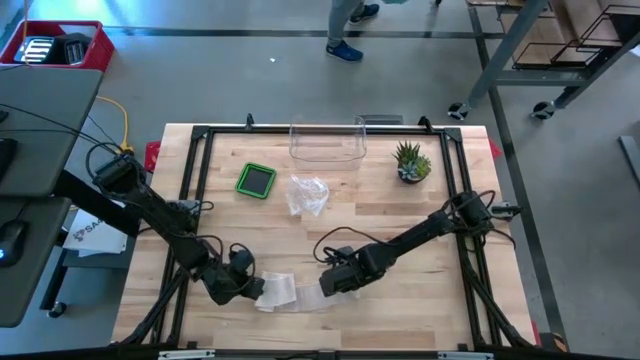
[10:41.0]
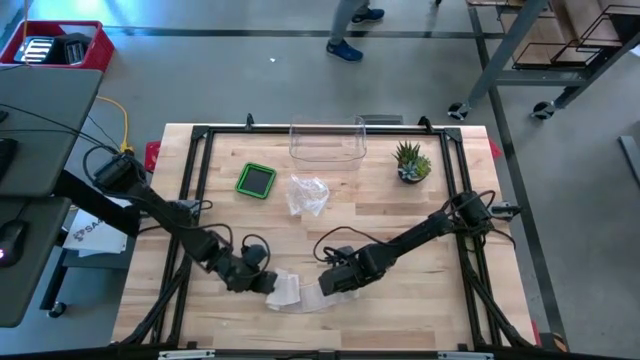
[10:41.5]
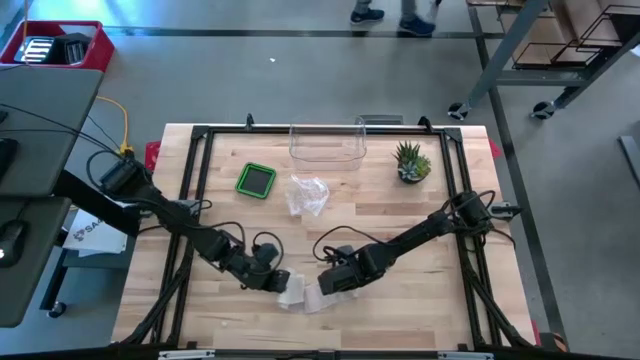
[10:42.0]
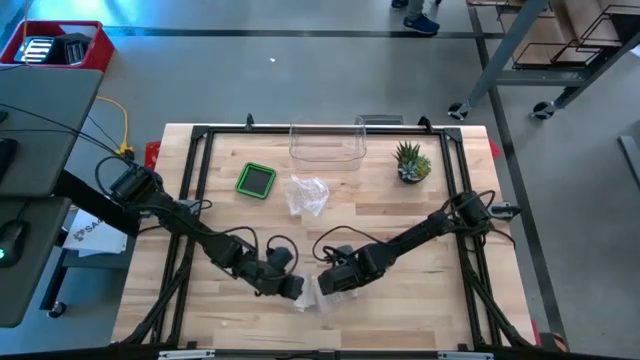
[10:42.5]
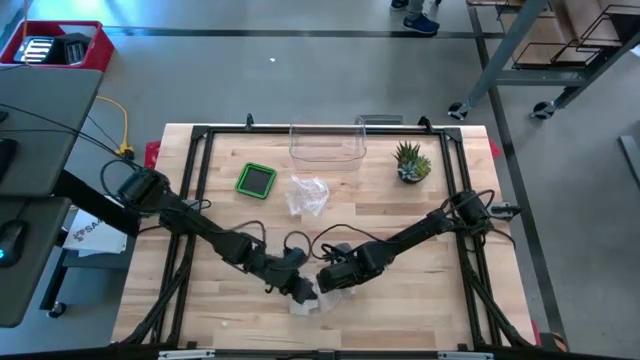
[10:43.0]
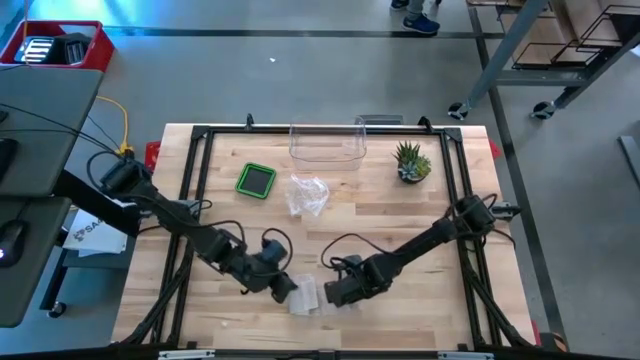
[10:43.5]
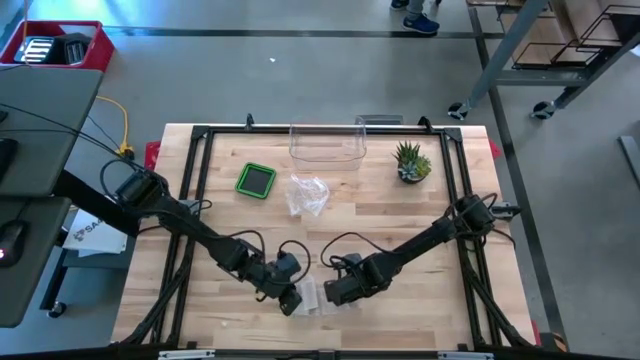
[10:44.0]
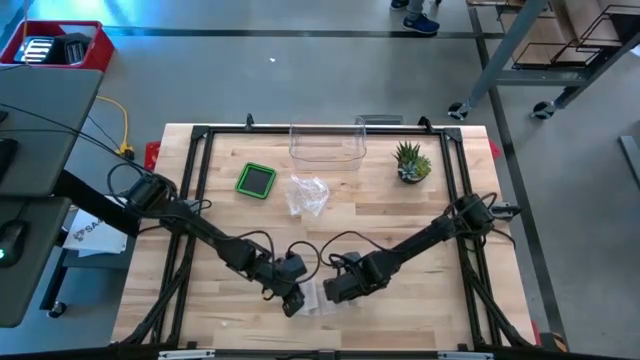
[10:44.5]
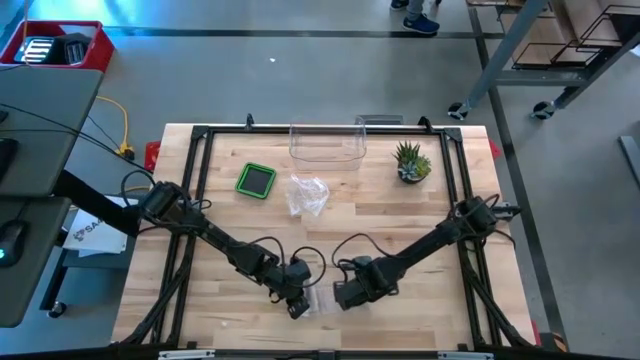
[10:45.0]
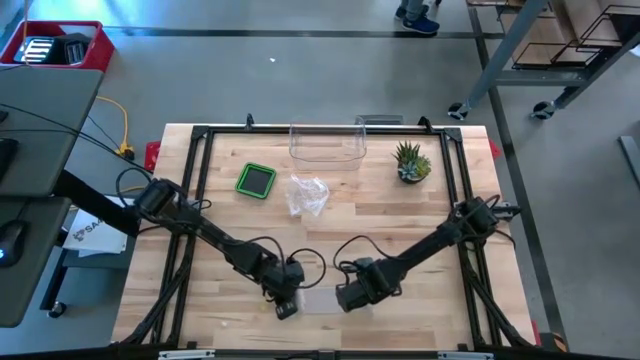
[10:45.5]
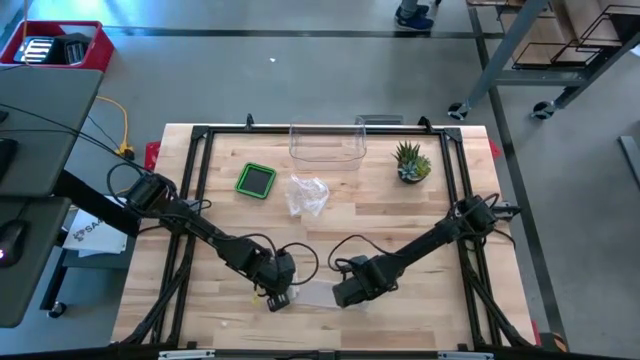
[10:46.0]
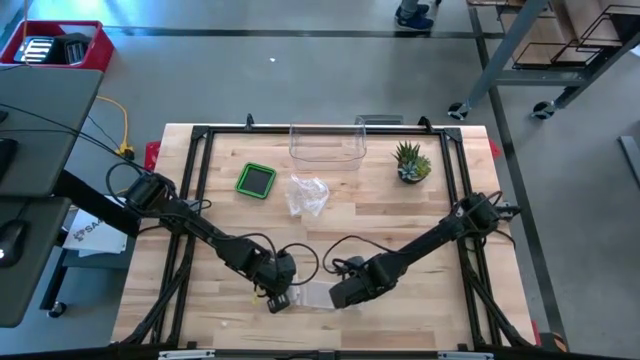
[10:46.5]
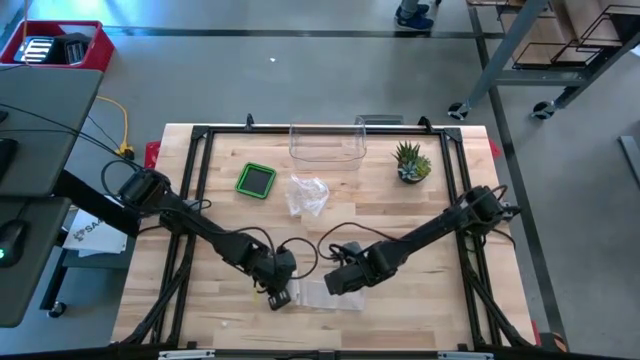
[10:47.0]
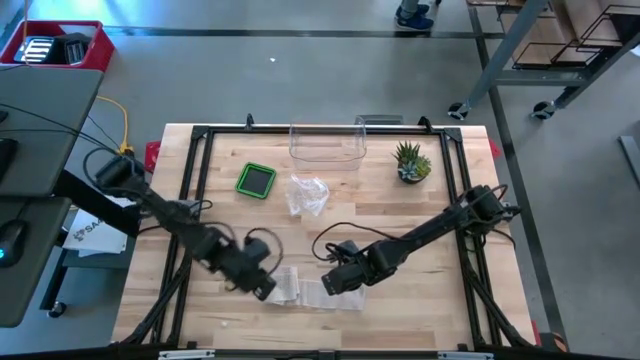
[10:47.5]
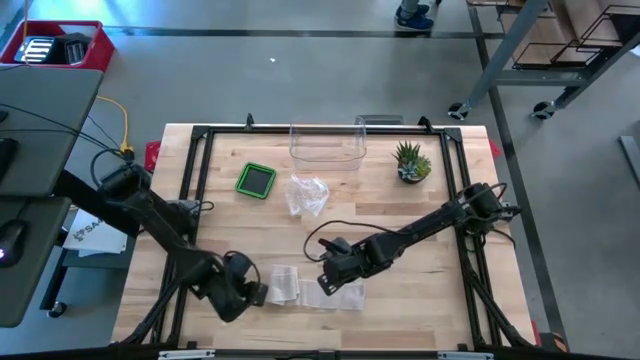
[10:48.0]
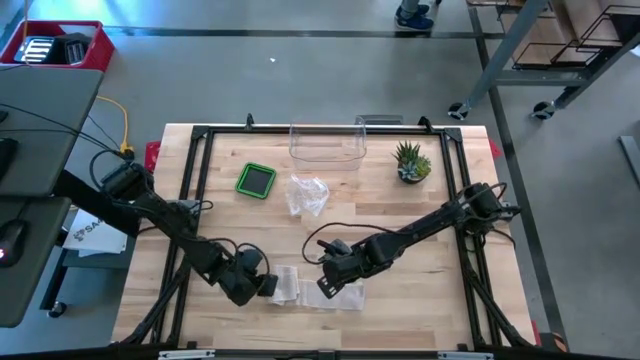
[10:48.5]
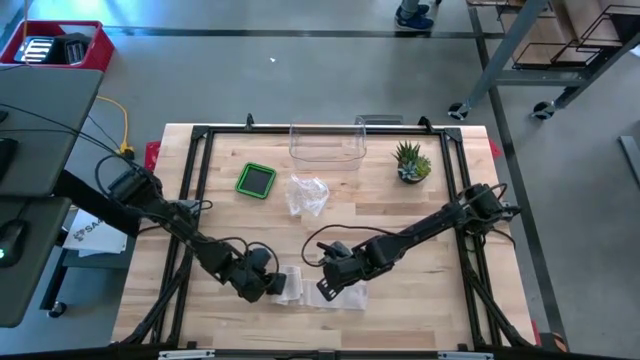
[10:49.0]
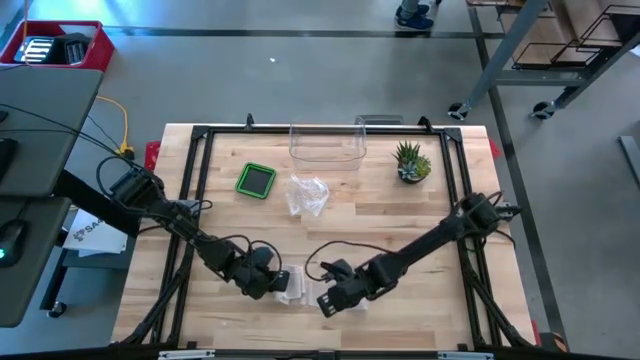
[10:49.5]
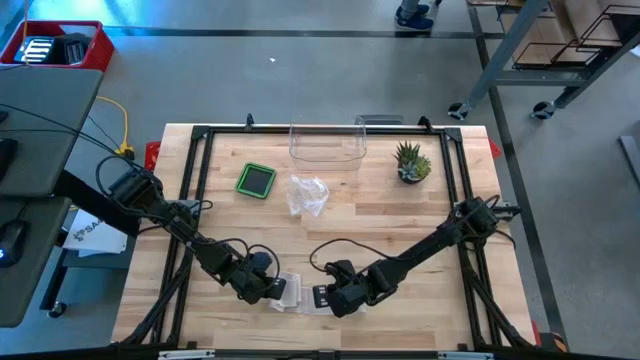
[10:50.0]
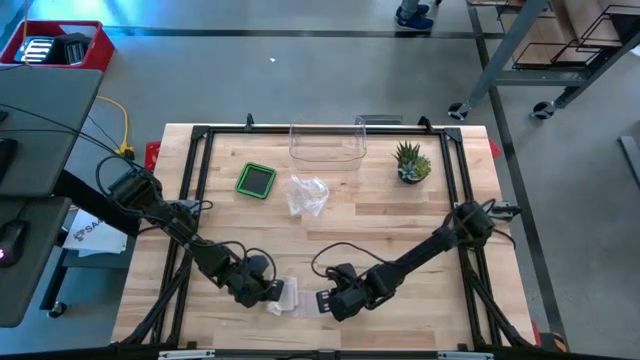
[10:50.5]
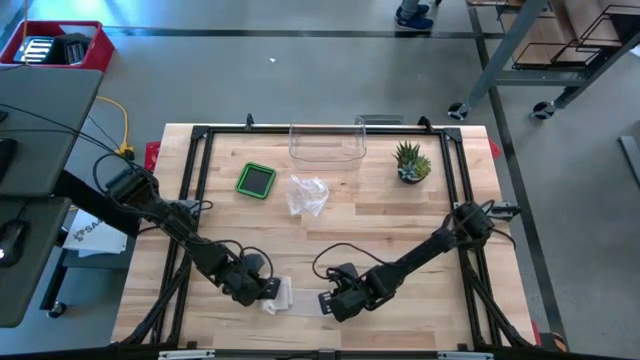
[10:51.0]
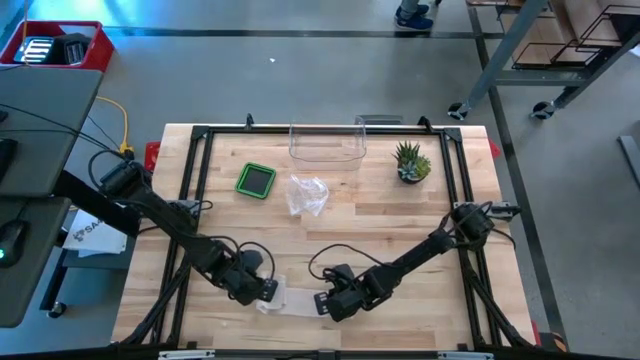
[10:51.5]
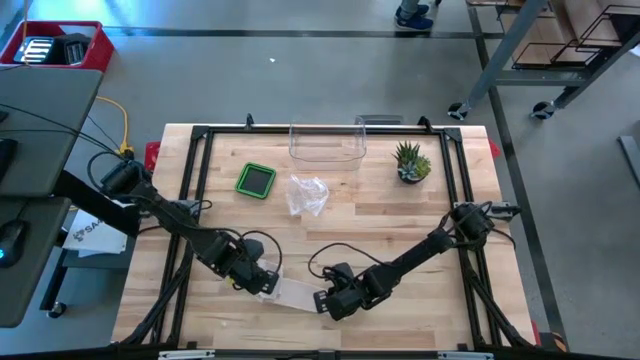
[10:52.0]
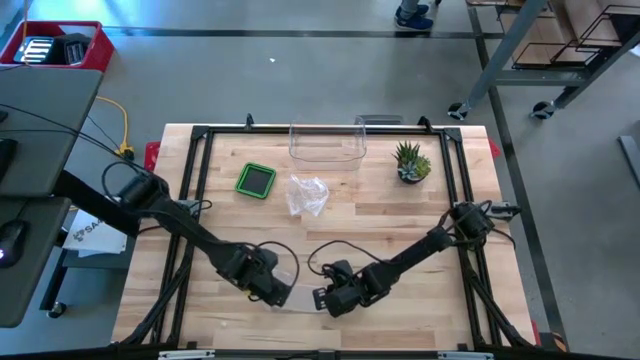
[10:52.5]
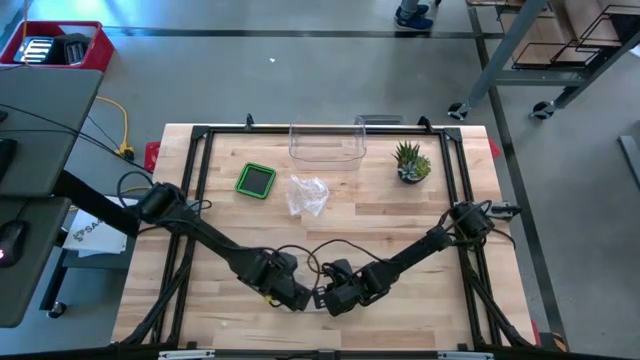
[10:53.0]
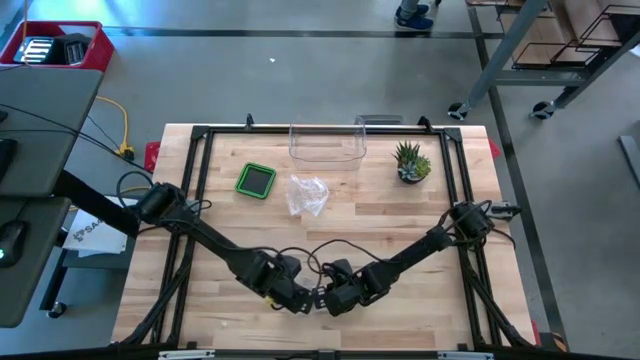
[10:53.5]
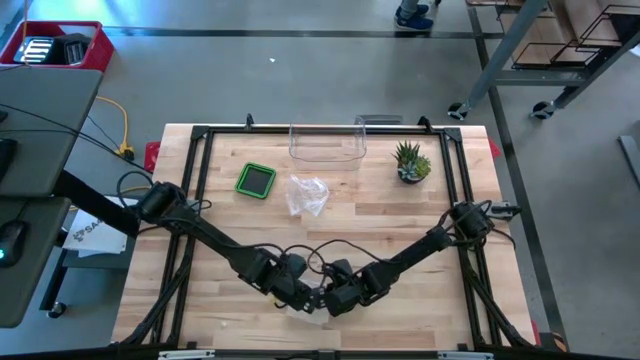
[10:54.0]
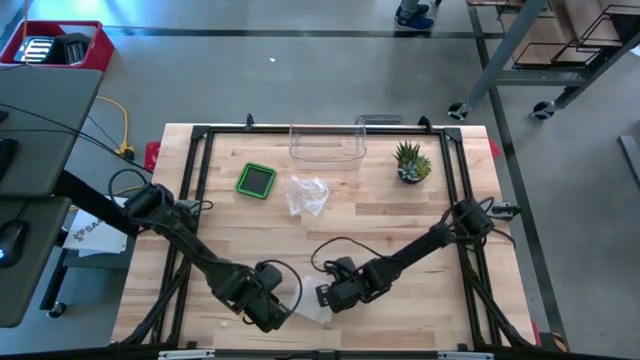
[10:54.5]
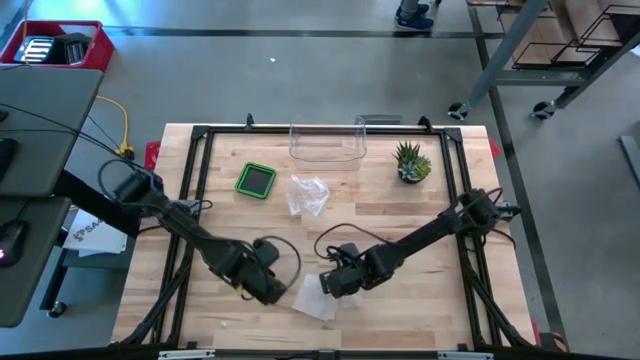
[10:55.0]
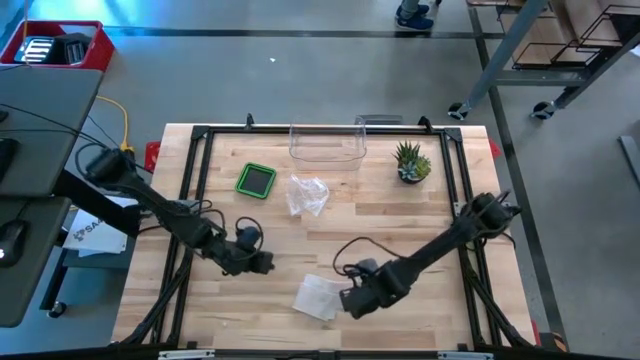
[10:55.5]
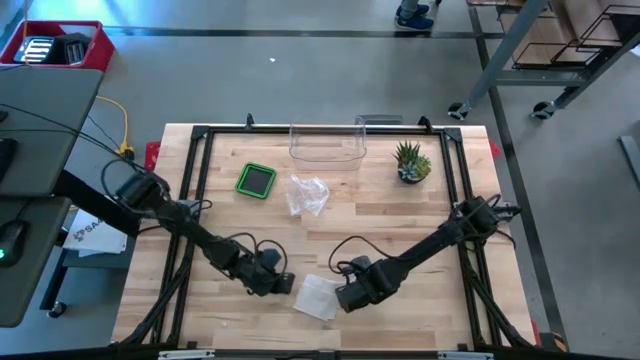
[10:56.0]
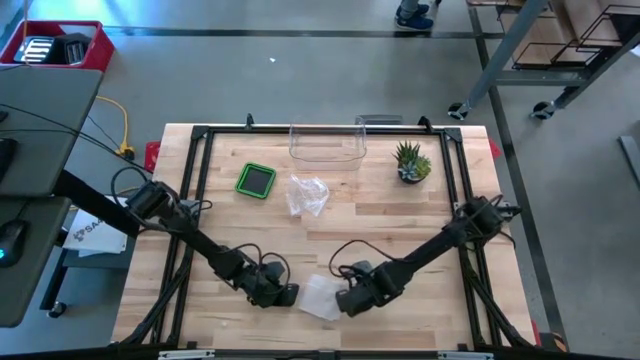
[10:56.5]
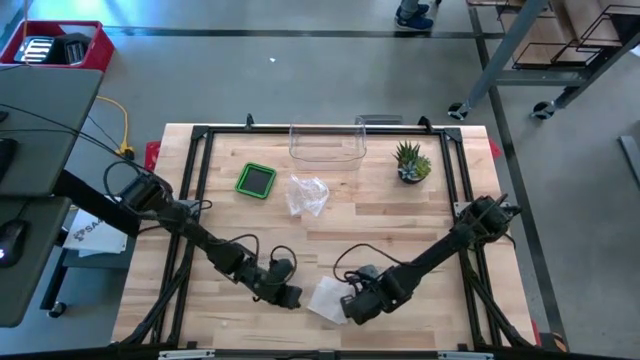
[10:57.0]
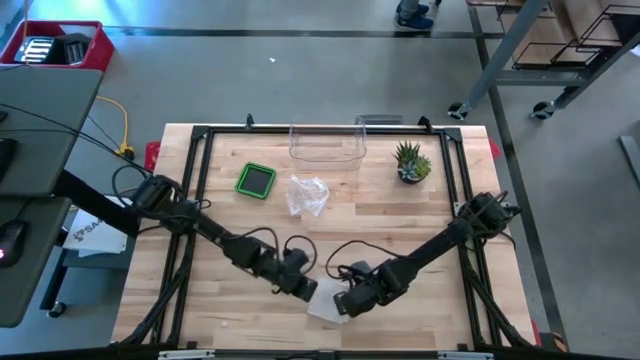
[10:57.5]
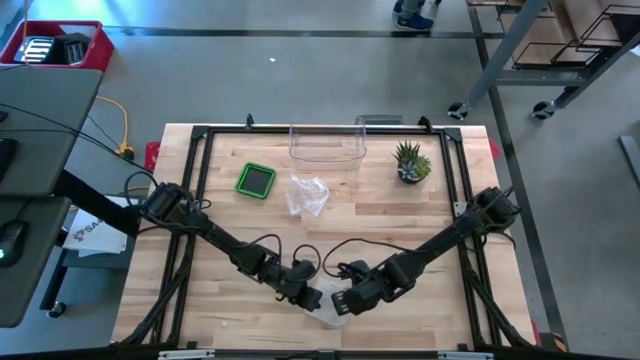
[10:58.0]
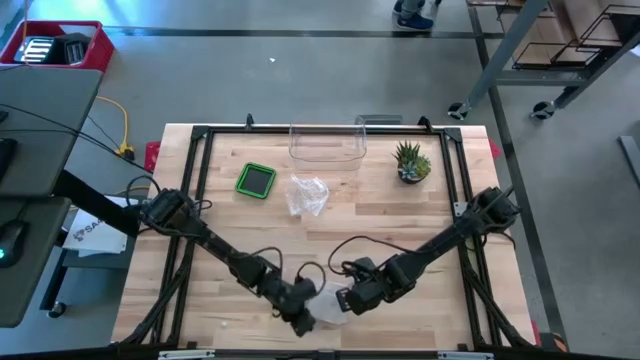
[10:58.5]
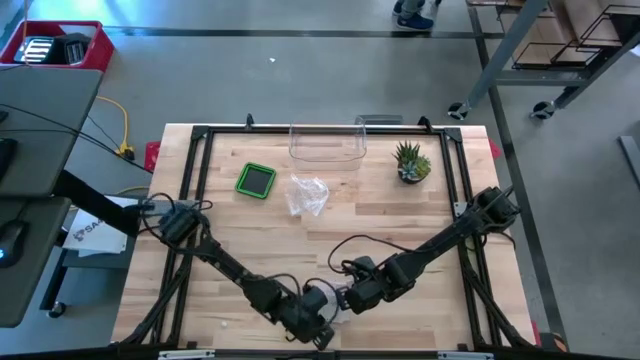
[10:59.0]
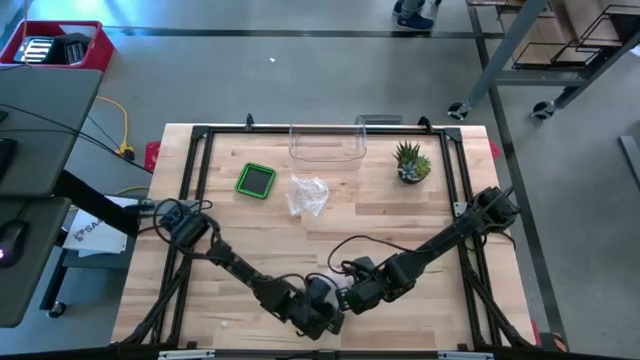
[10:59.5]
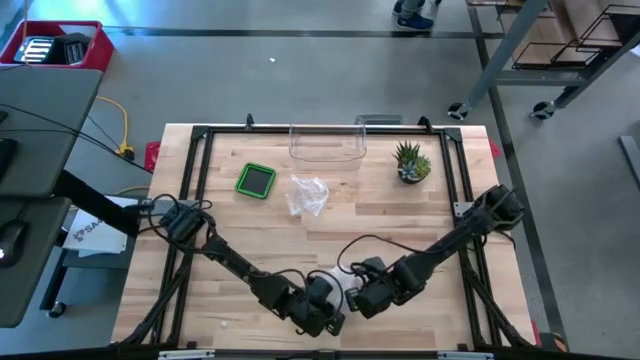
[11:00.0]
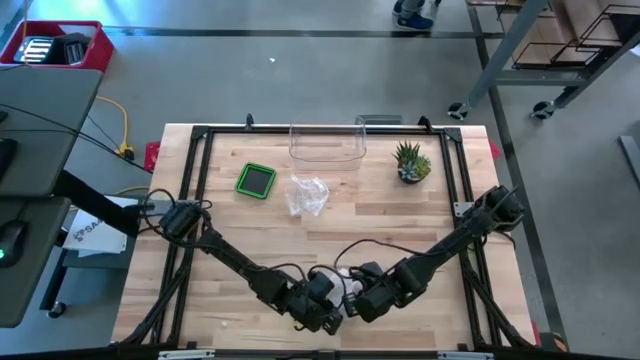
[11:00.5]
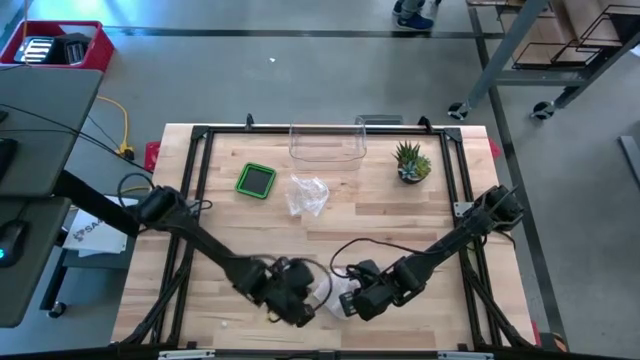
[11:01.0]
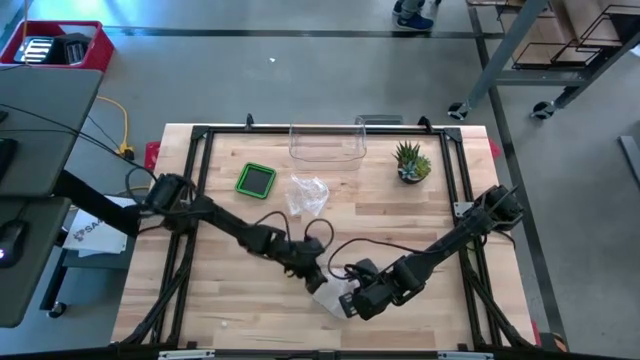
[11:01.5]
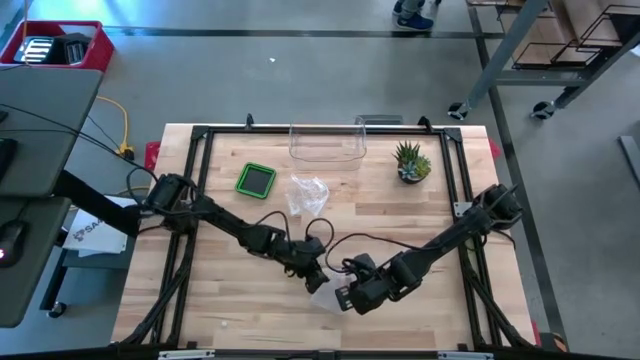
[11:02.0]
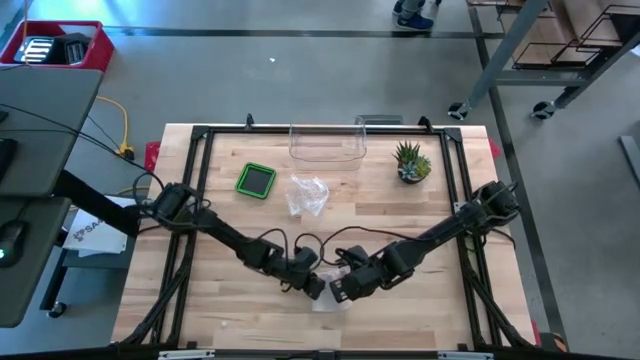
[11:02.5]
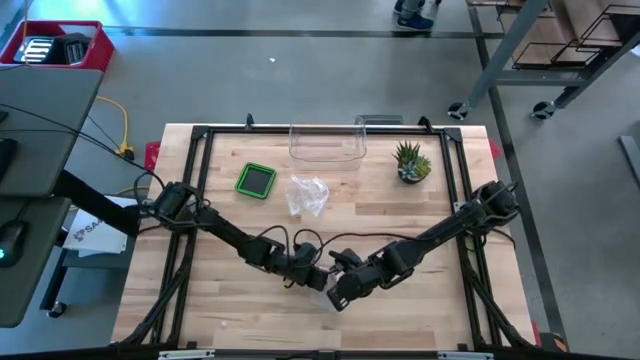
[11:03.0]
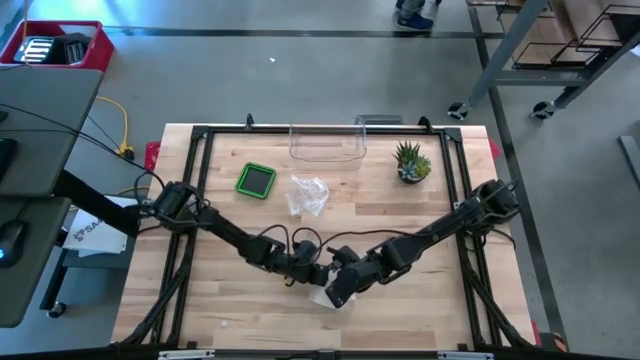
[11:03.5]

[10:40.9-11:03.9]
Task: Roll bandage
Roll the bandage
